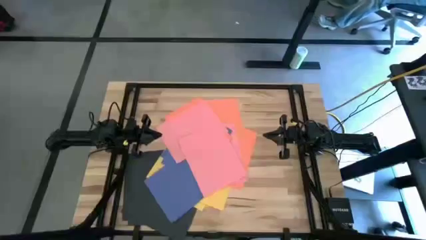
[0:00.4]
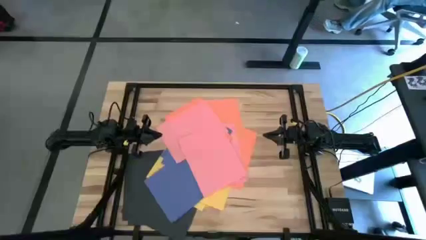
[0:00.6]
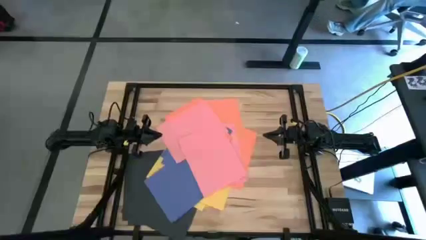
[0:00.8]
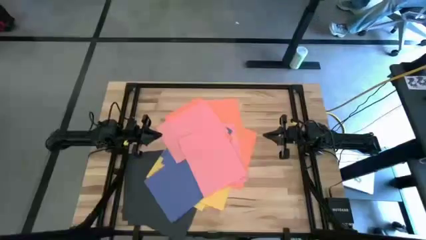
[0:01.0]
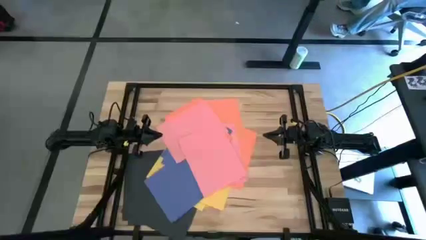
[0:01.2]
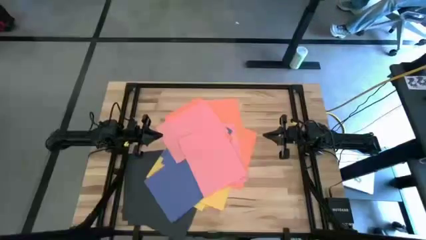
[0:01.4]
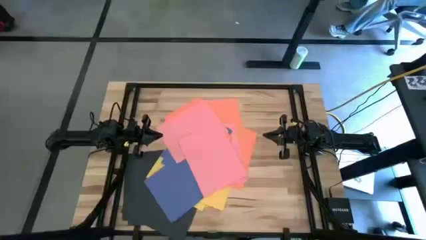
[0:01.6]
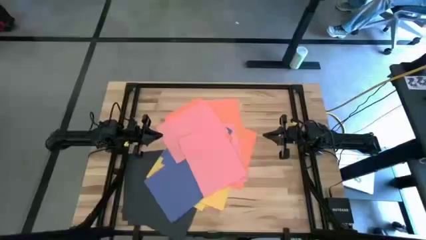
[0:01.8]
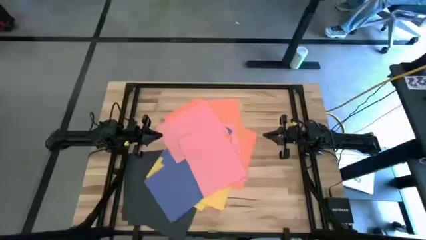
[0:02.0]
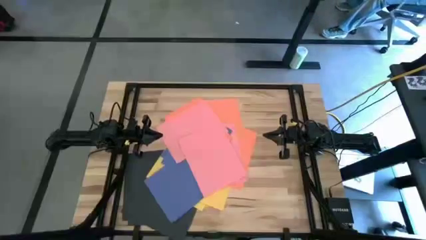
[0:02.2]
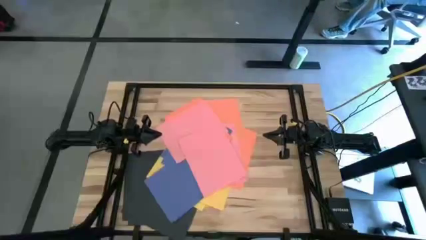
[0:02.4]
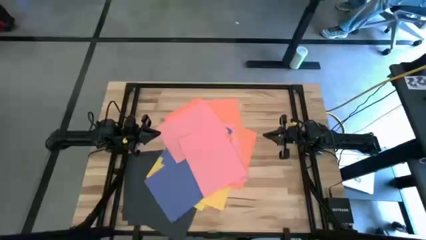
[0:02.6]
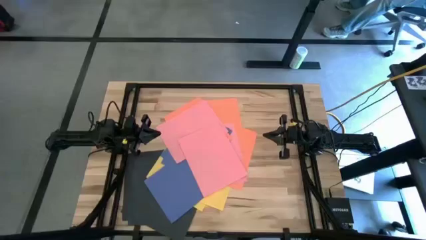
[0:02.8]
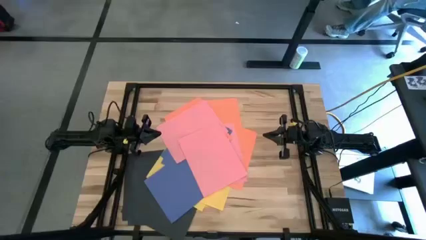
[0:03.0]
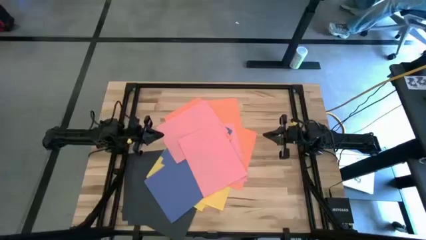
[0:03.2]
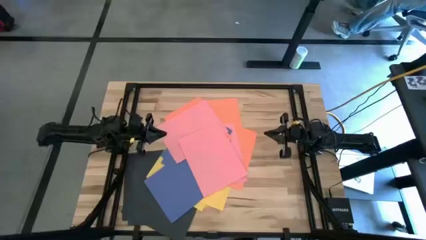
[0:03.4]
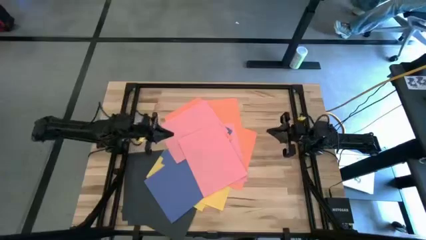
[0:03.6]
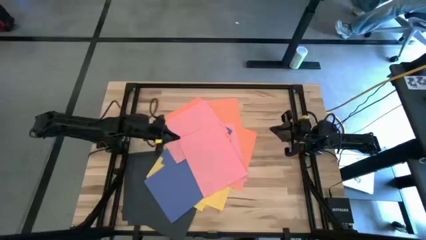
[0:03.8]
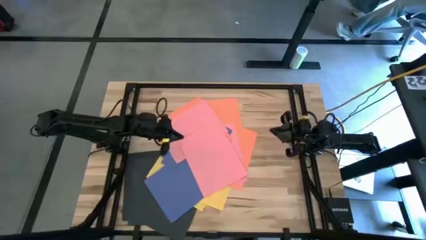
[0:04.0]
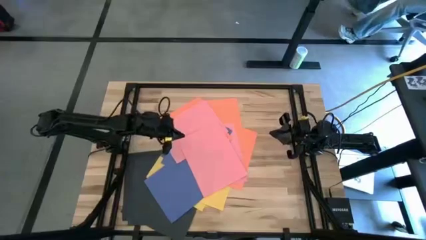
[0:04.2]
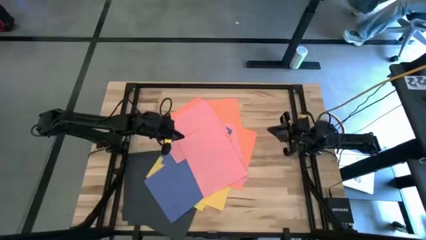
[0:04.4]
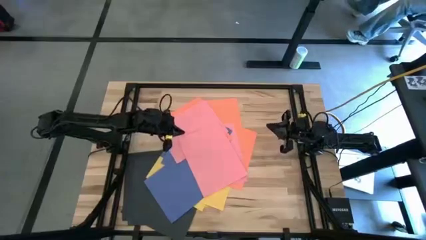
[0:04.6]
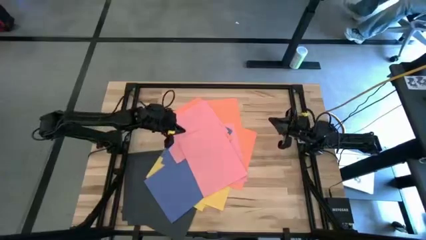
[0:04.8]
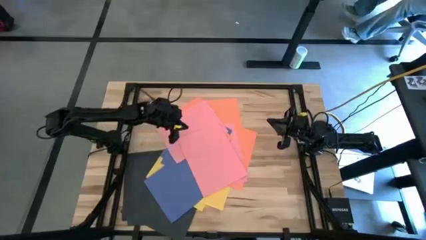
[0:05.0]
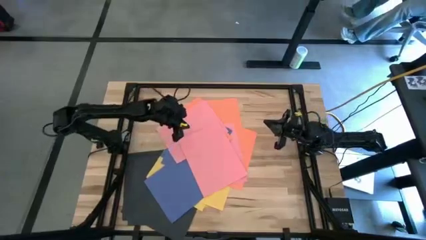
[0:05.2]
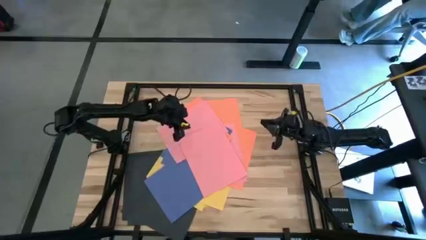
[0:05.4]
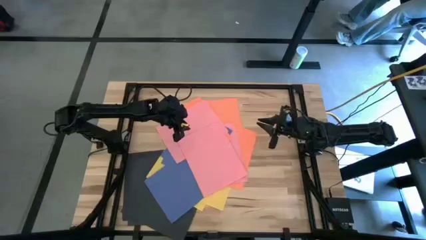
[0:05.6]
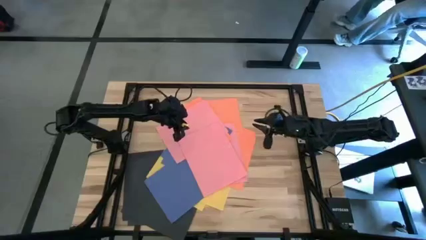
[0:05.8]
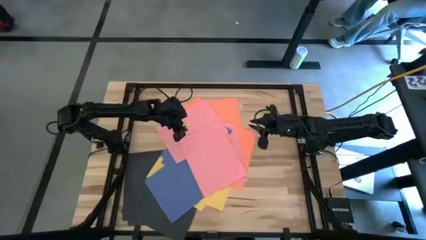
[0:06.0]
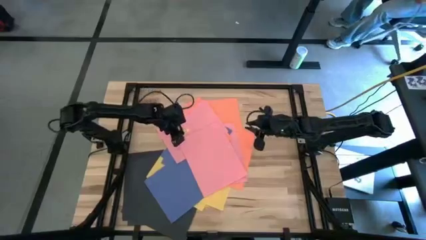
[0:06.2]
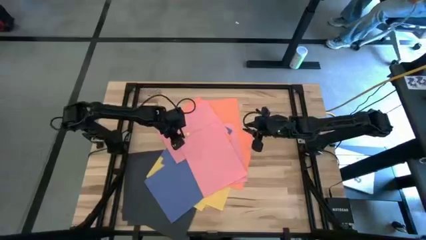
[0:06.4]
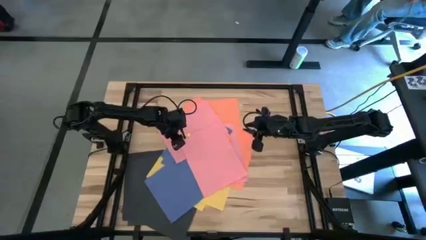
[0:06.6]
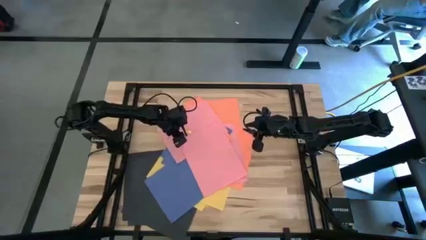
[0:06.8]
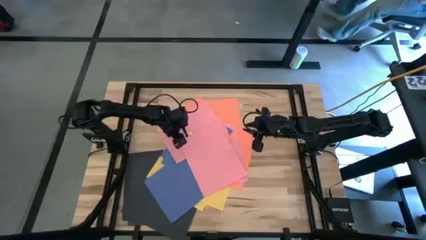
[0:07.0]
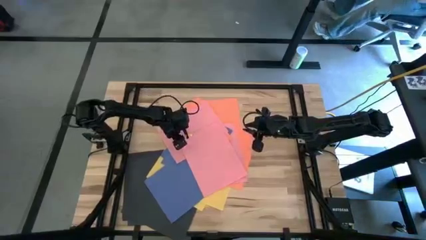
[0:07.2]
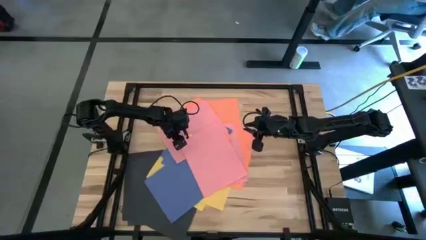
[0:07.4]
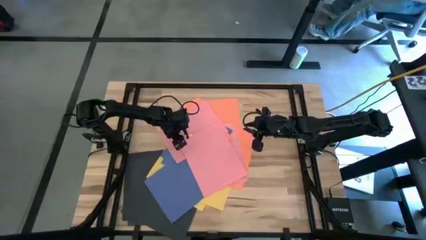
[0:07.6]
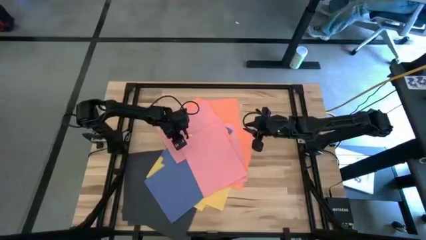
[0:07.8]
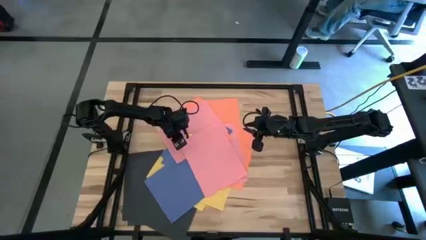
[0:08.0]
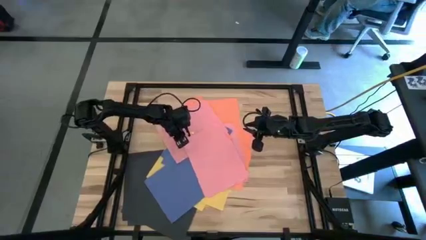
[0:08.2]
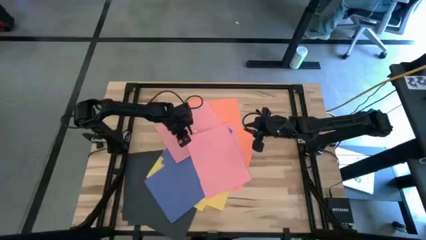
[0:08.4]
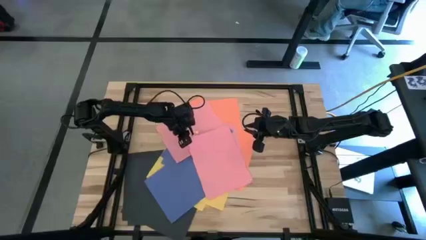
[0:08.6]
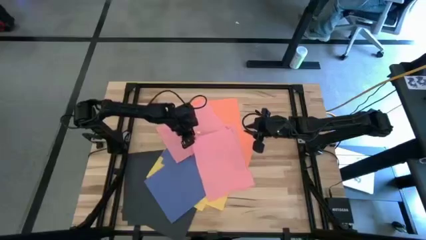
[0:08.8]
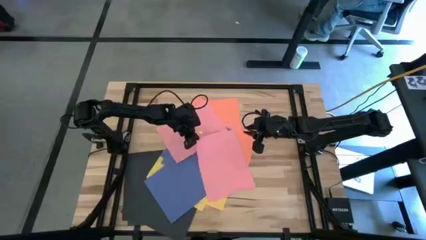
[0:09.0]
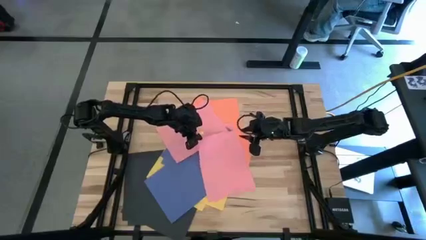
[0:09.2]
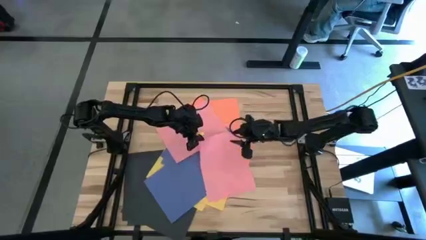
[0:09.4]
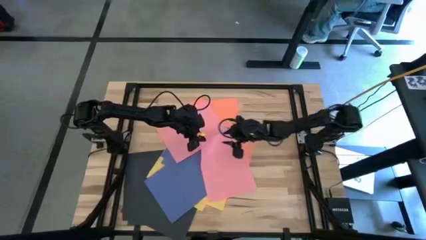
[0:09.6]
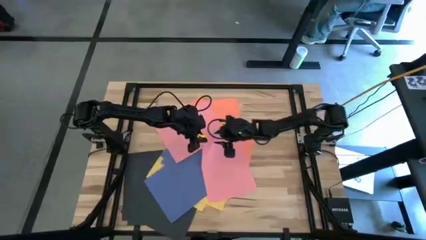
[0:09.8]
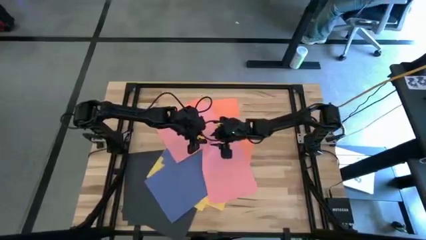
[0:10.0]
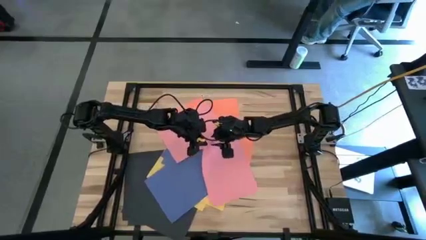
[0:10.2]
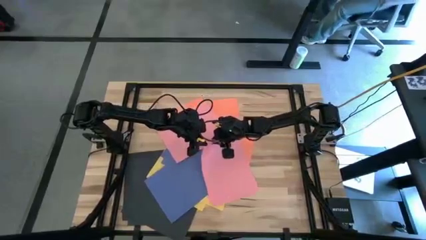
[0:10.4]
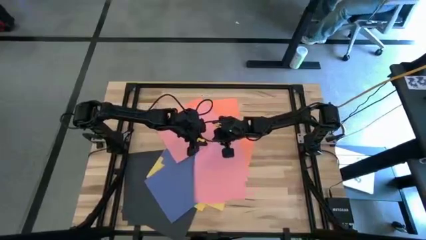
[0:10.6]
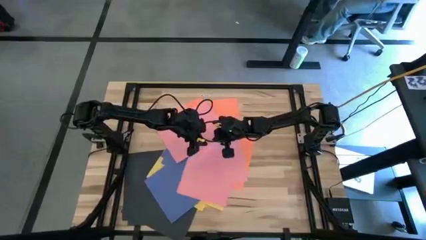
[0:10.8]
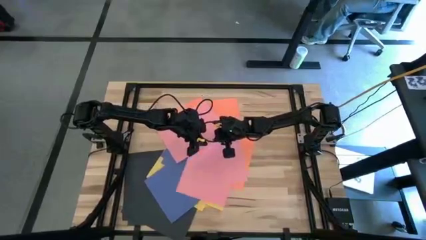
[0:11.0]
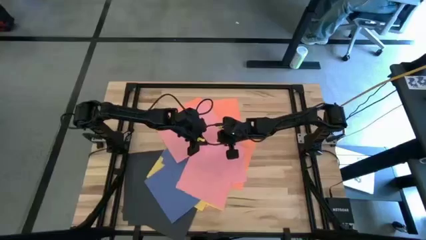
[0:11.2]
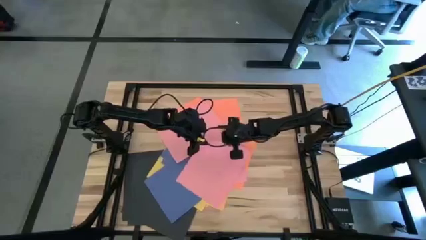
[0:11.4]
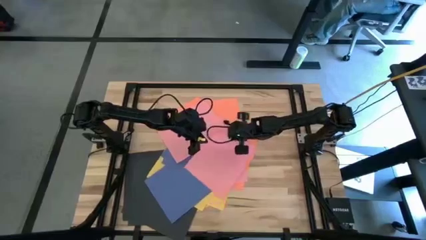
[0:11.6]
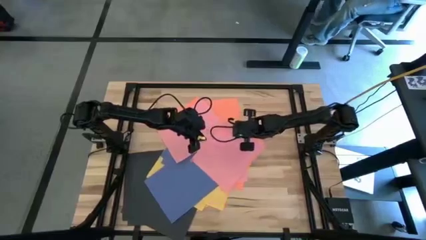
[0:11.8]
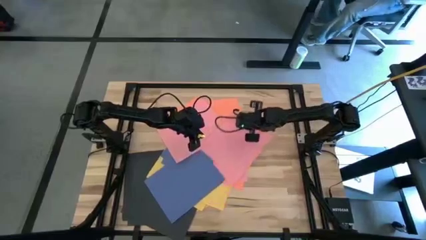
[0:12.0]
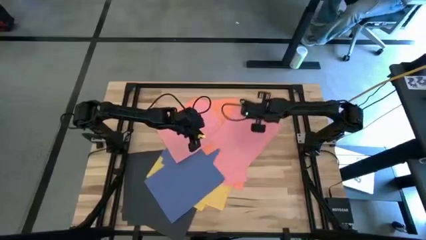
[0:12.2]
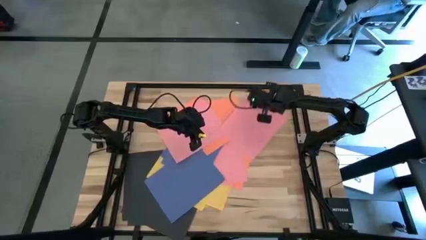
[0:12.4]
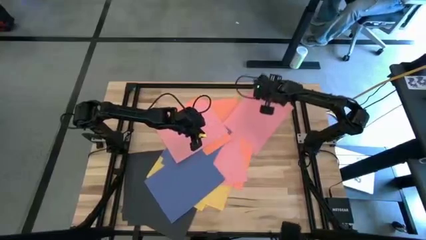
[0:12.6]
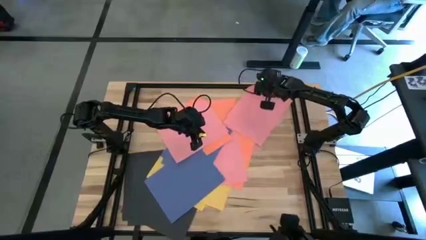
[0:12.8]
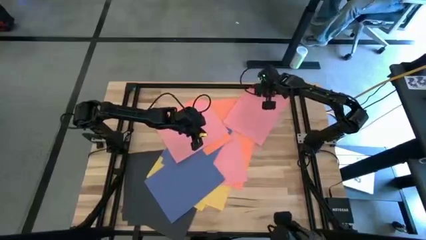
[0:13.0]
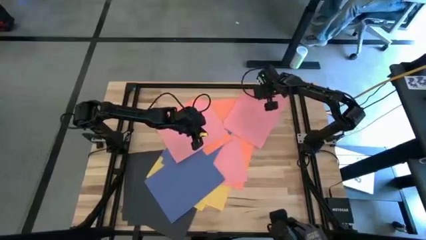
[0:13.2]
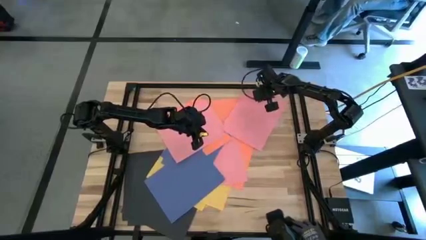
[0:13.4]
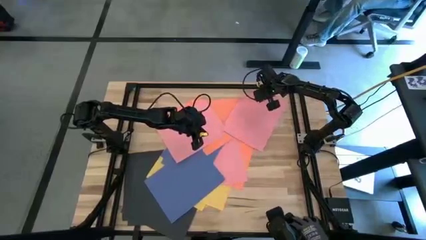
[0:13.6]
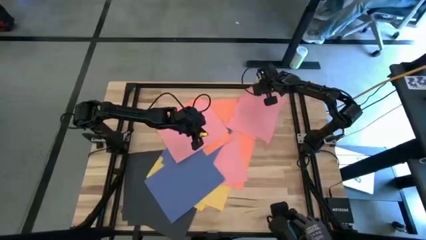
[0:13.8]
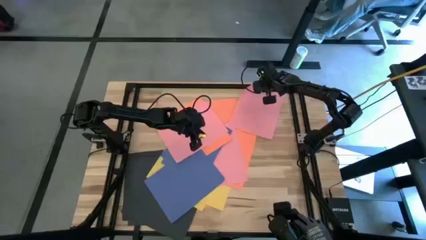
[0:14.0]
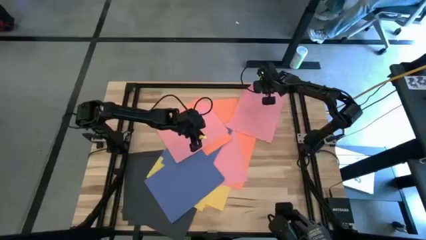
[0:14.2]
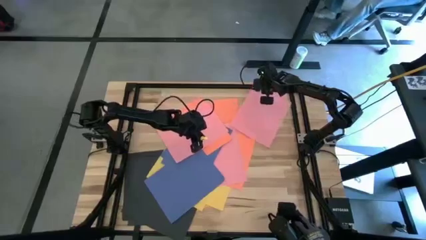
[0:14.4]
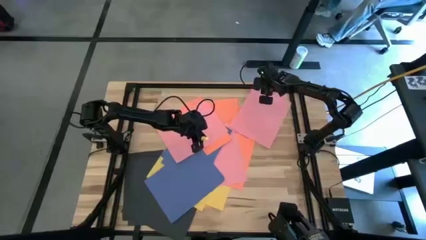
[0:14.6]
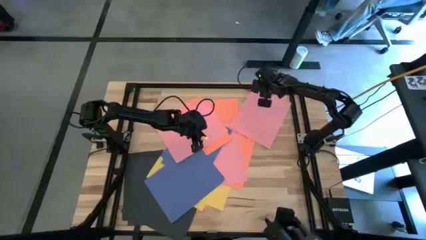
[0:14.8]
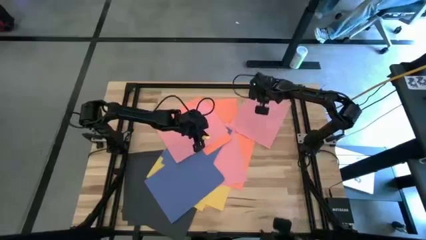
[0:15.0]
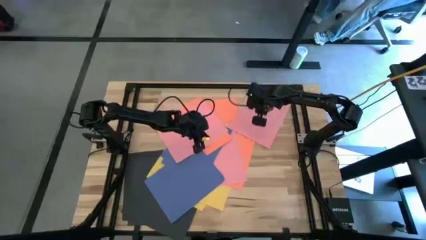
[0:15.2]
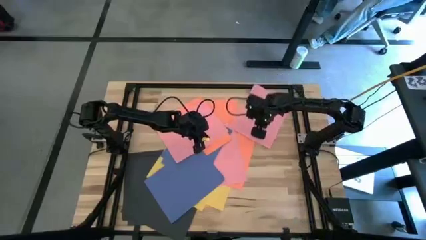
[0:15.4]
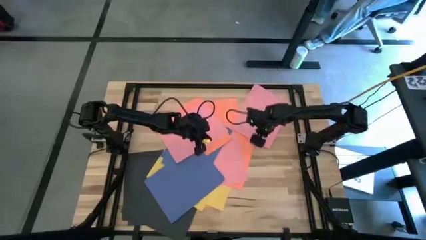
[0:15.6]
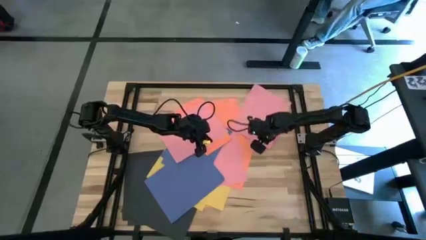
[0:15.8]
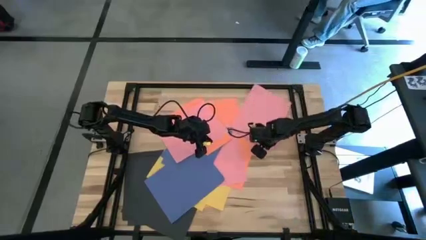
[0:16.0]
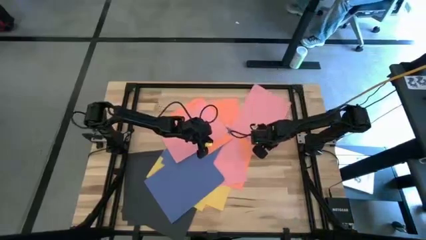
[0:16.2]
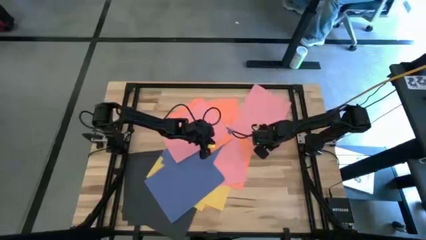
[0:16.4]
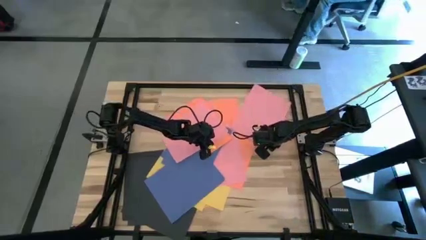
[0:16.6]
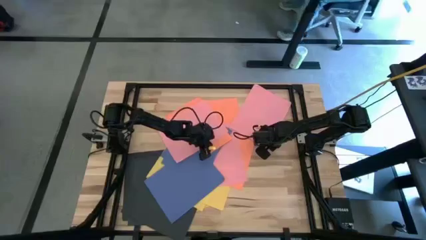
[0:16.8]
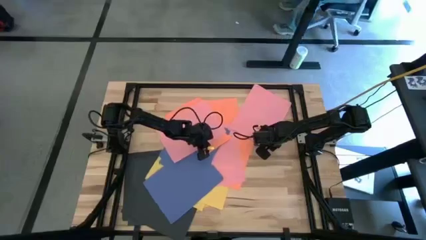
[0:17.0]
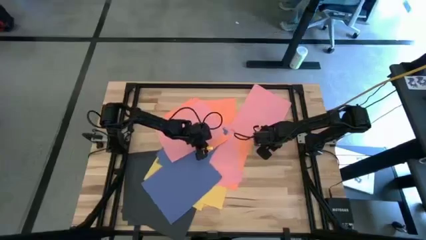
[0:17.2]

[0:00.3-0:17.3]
Task: Organize paper
Put the pink paper to the top right of the table
